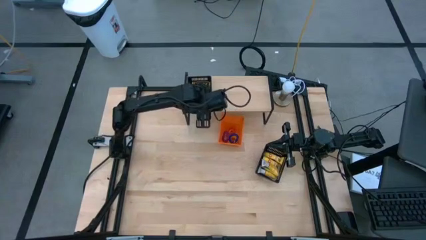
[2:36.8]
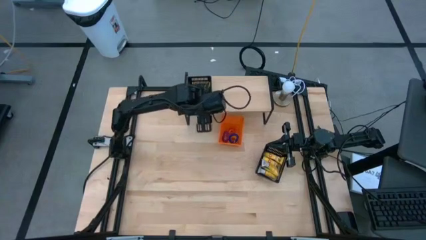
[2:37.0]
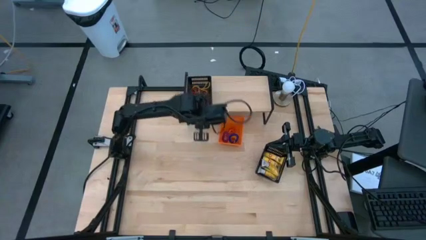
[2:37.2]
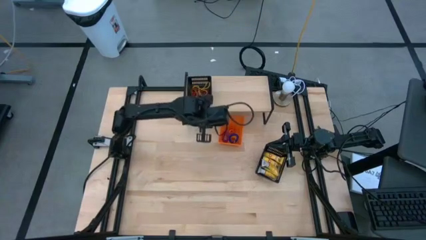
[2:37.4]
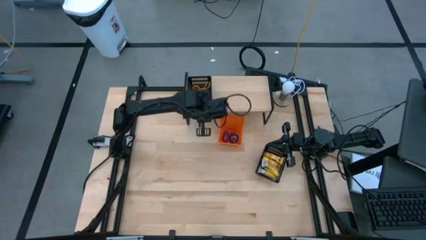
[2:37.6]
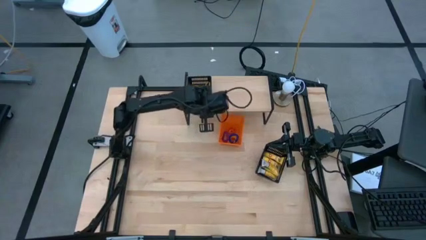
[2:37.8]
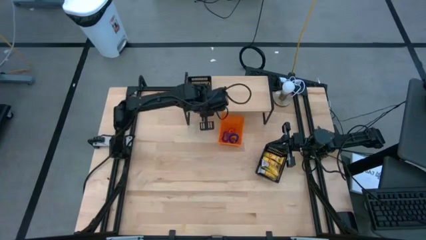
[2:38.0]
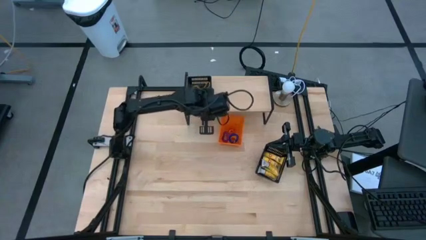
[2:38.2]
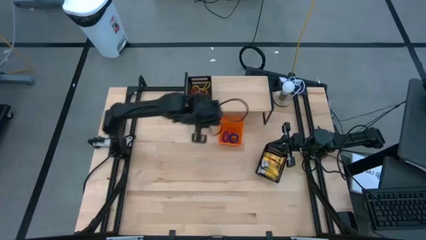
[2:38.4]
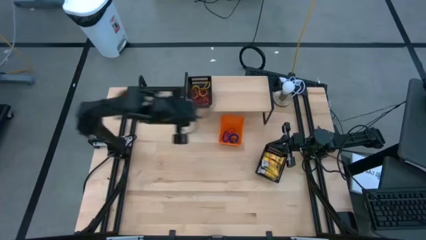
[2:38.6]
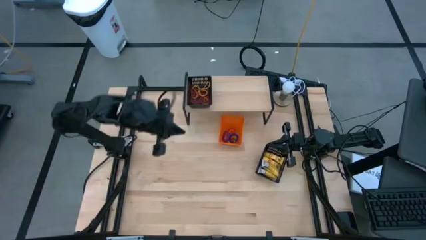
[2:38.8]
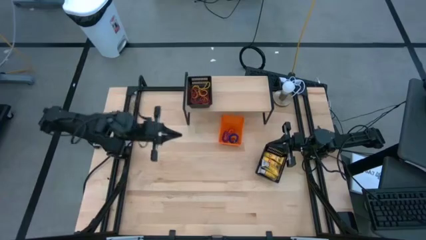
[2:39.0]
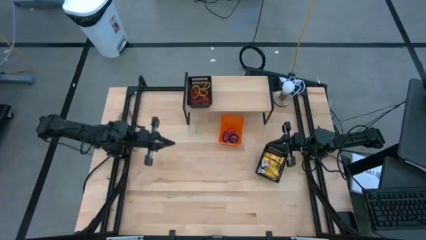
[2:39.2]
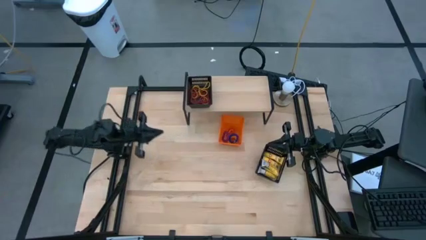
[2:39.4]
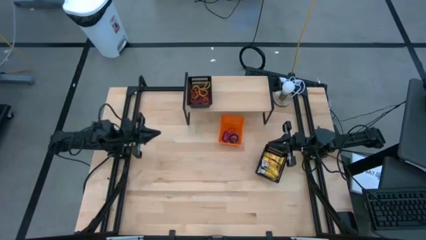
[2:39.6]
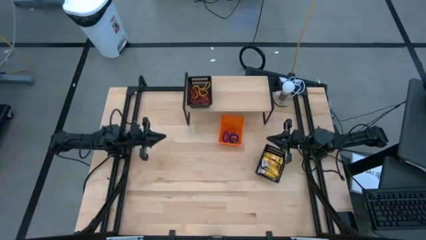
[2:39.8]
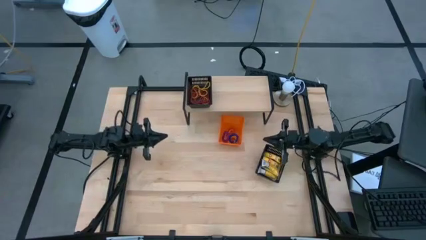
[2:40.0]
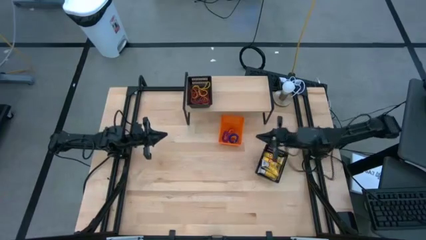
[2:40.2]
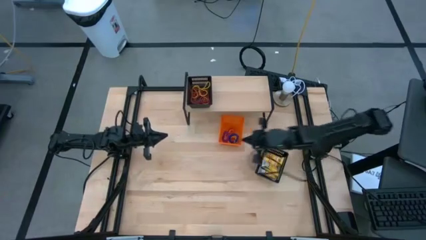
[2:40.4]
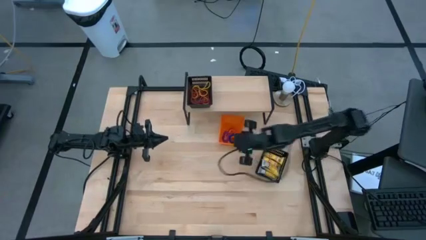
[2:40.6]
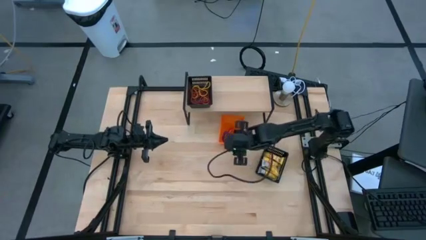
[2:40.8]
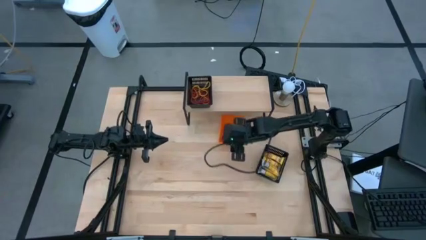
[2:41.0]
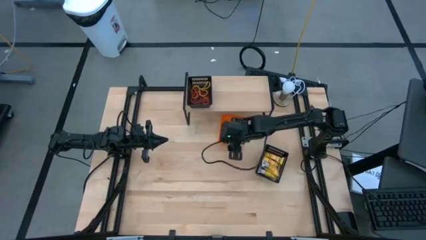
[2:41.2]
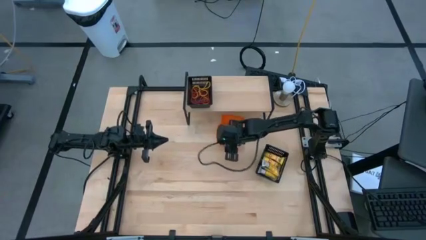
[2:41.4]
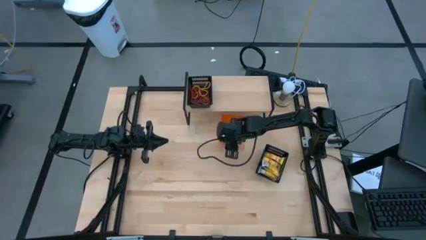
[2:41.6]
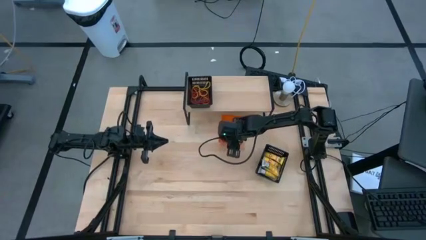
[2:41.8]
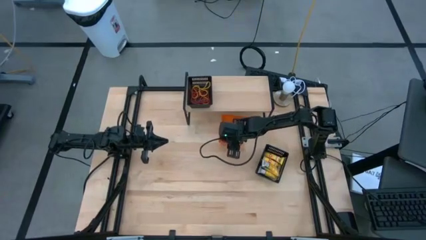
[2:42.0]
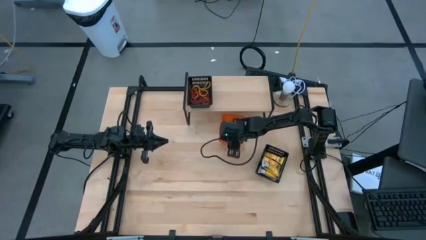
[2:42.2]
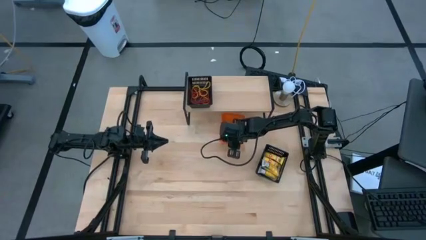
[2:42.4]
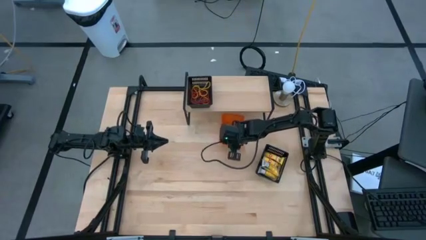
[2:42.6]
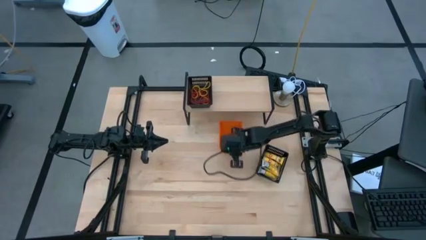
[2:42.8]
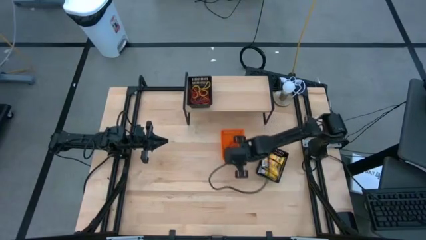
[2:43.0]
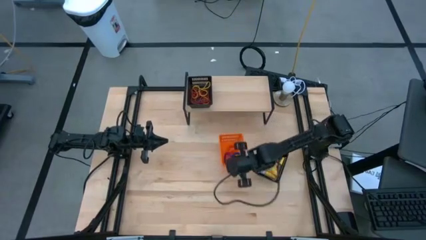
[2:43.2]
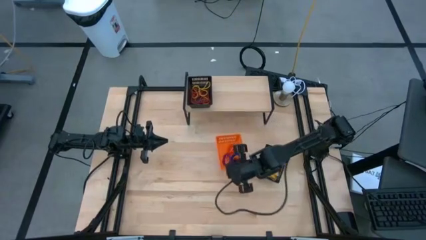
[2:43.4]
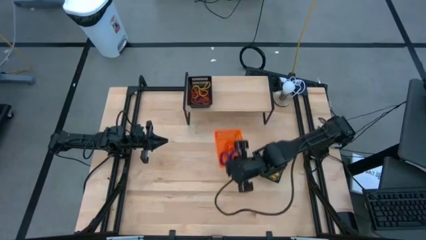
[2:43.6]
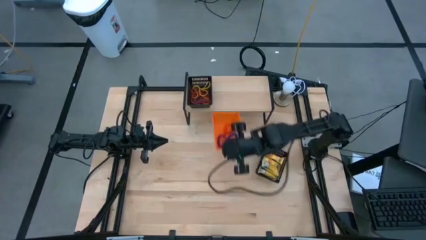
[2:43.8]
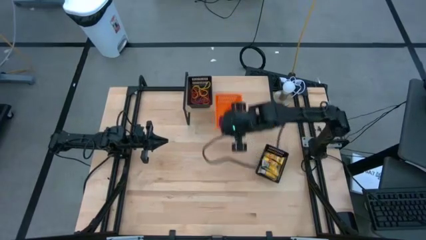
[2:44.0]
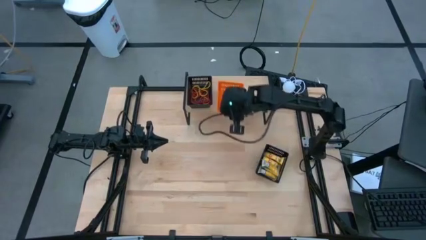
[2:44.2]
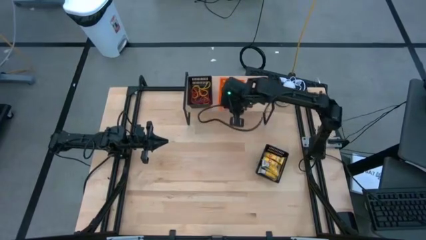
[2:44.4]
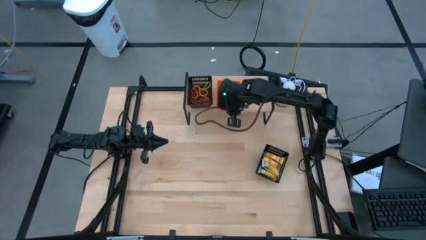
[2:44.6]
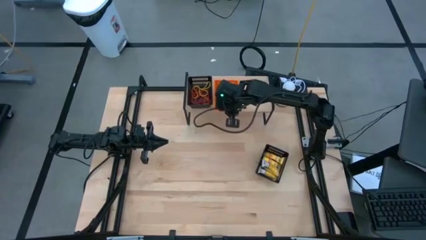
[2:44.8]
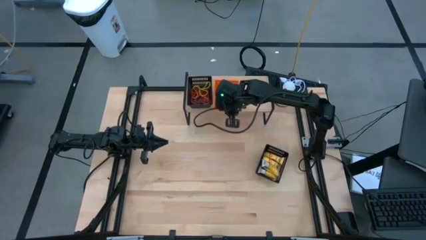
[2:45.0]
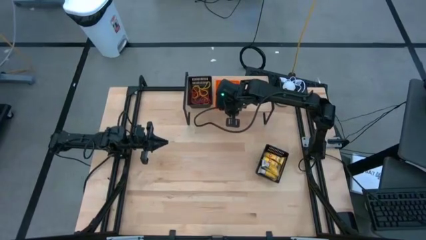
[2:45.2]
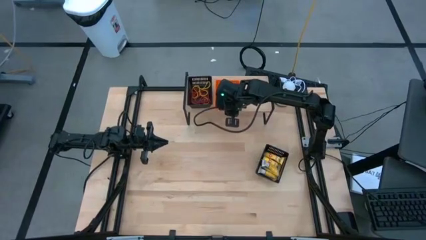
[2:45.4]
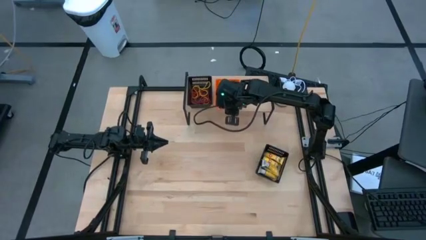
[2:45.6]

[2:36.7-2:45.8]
Task: Pick & Place Office Desk Supplies
Put the orange bin on the shelf

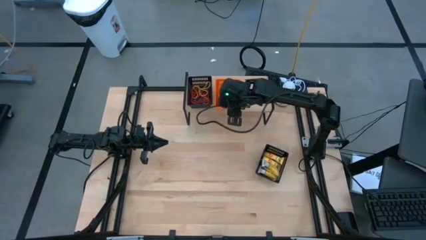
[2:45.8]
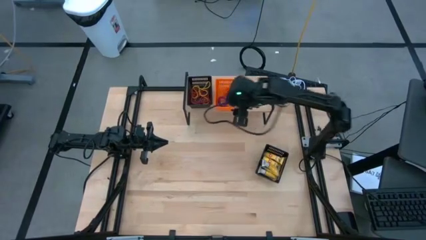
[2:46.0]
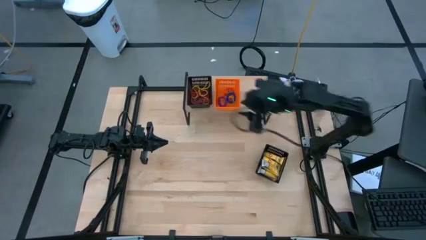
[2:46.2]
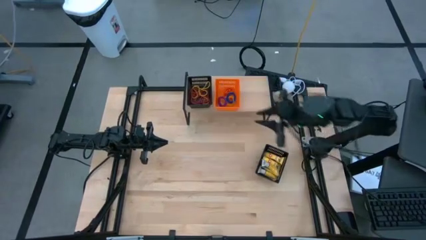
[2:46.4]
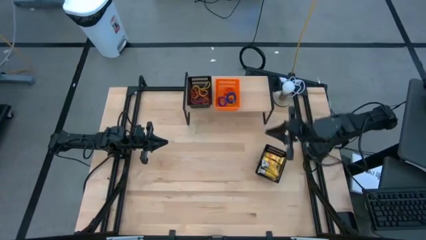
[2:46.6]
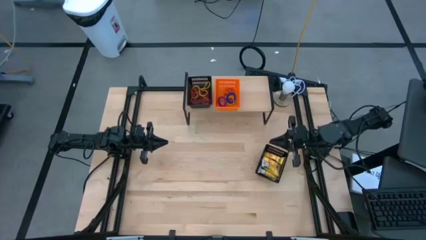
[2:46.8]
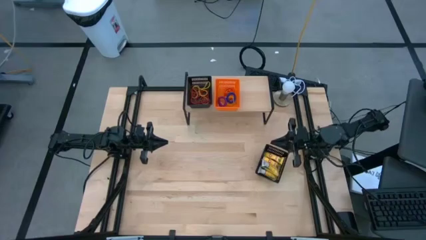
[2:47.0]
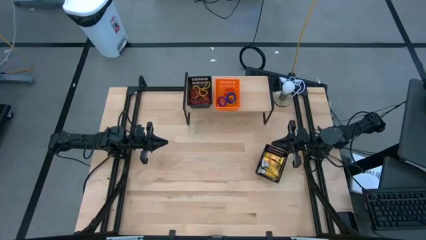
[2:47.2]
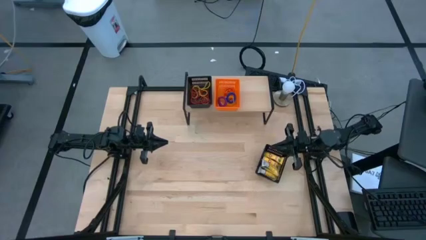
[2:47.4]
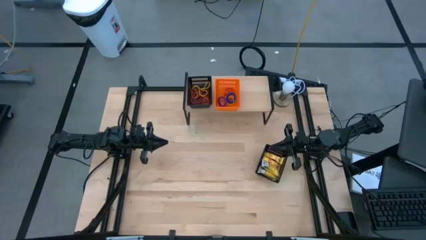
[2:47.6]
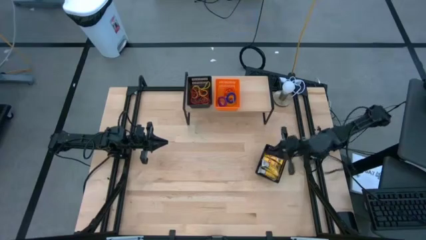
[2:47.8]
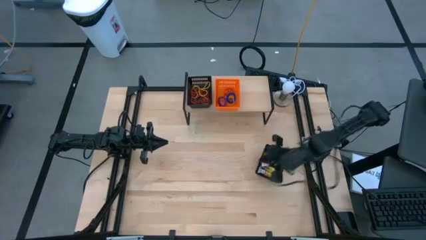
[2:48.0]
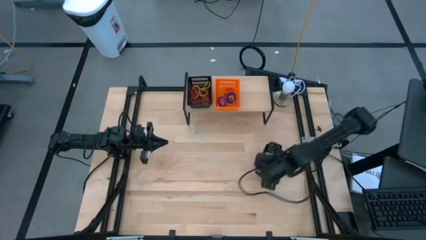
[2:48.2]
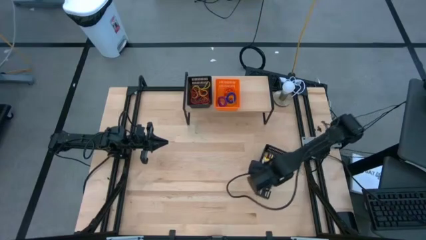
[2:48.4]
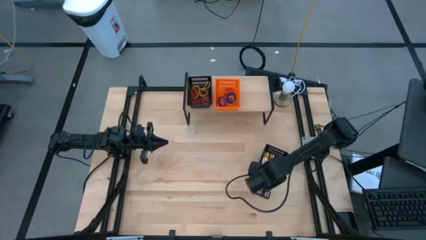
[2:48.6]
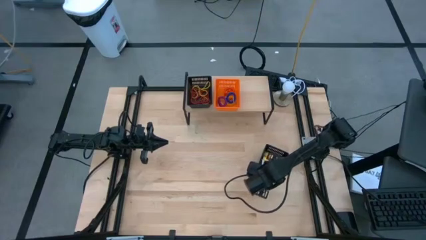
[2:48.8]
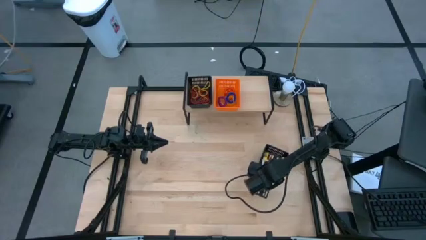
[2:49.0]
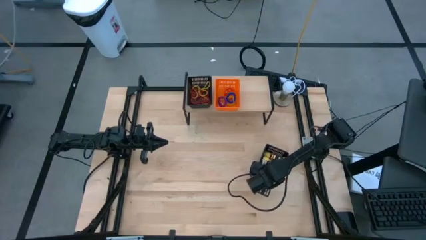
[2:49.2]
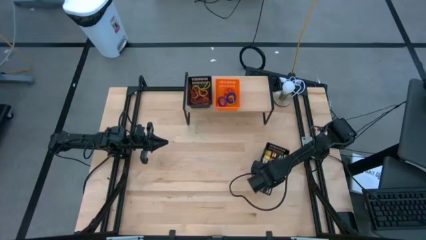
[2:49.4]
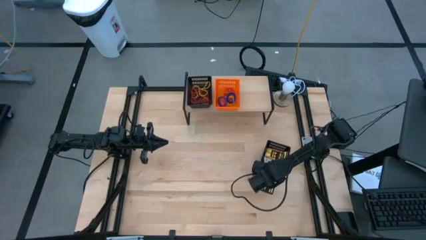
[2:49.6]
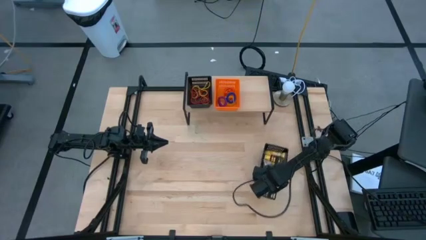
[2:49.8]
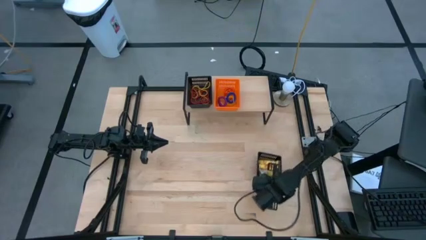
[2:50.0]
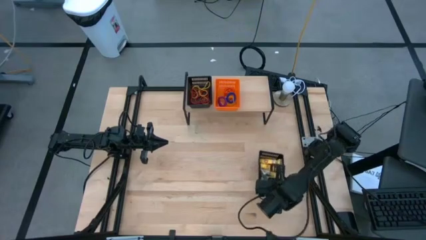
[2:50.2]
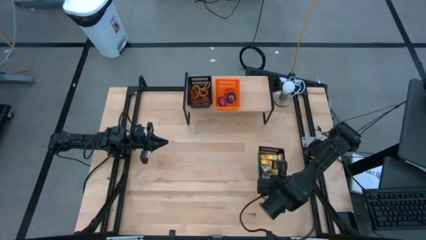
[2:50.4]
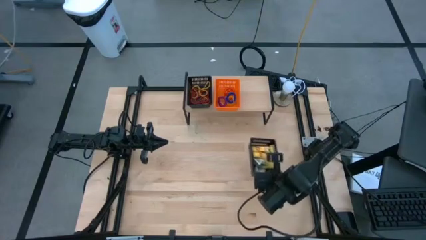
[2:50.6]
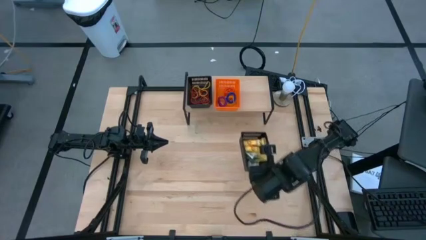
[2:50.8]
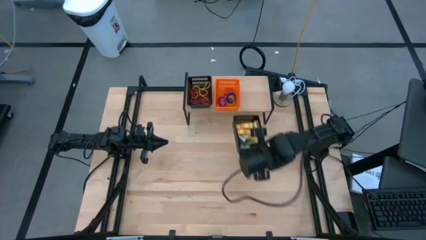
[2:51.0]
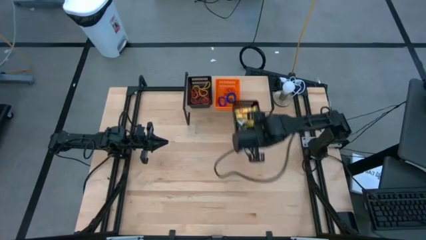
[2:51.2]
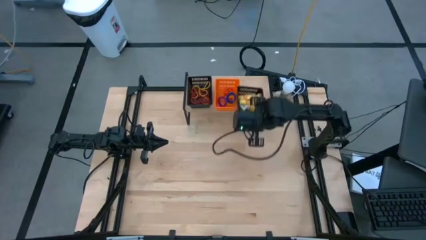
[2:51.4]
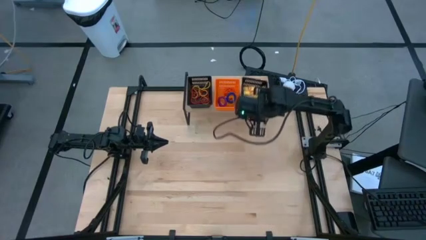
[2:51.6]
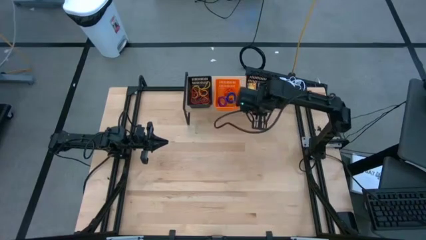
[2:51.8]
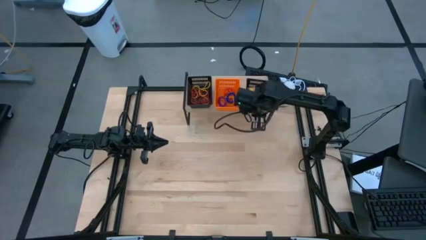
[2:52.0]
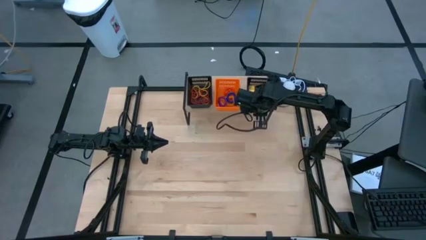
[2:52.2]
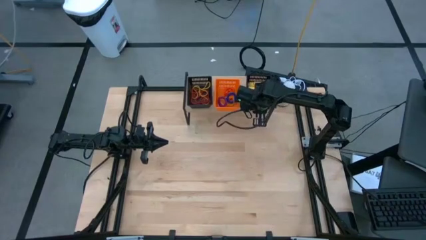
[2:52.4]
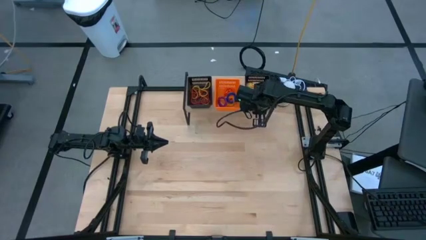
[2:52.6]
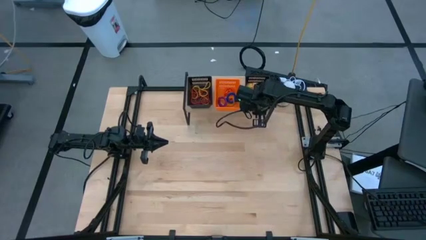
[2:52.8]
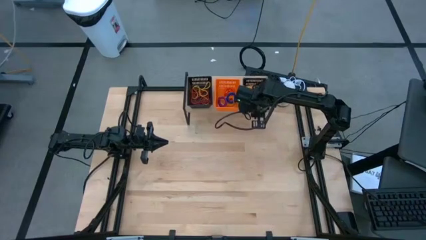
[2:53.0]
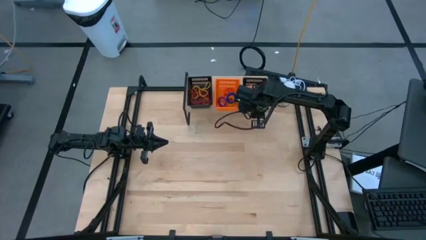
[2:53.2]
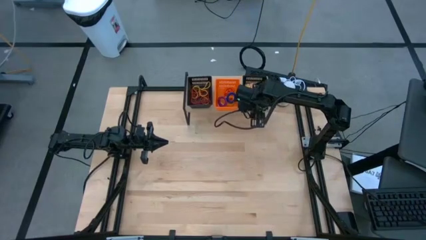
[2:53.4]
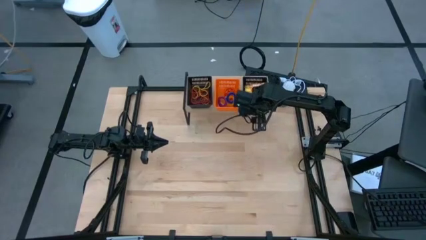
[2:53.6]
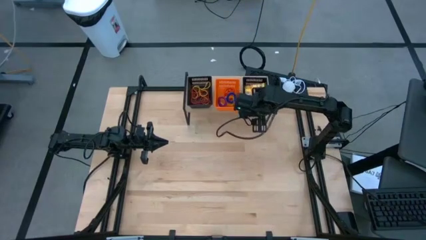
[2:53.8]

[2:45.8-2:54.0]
Put the black bin on the shelf
